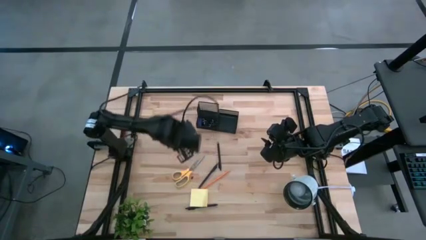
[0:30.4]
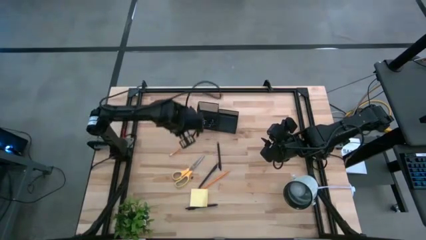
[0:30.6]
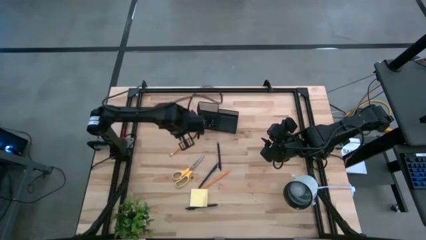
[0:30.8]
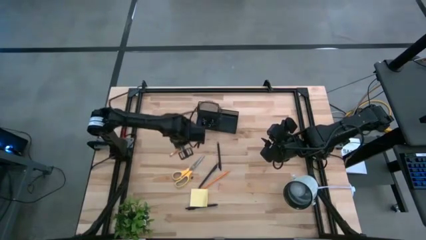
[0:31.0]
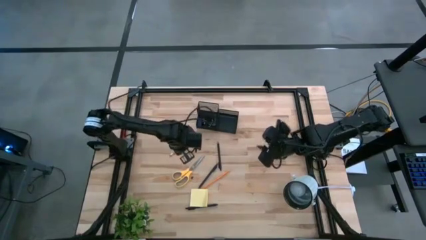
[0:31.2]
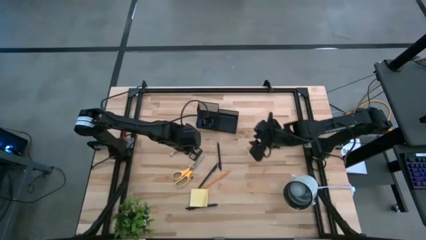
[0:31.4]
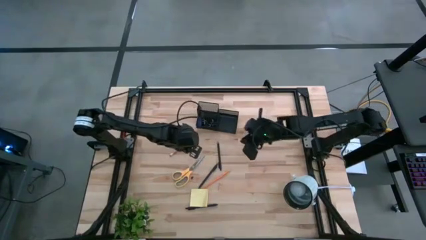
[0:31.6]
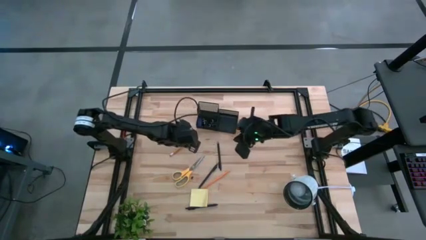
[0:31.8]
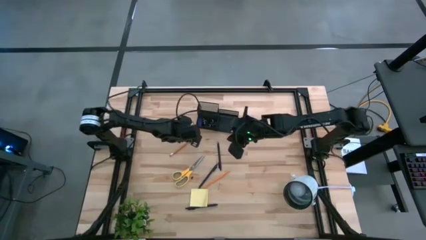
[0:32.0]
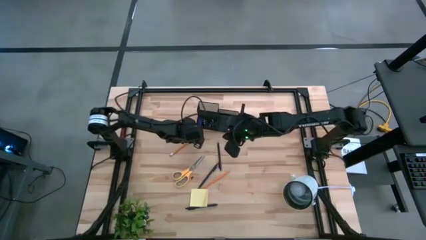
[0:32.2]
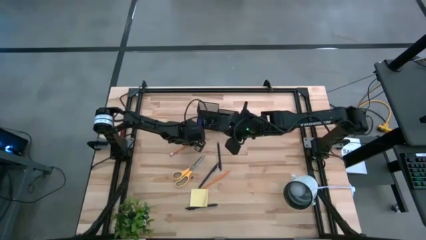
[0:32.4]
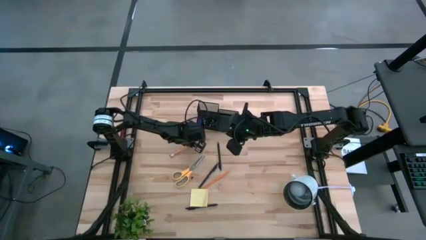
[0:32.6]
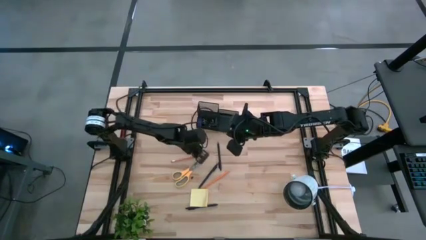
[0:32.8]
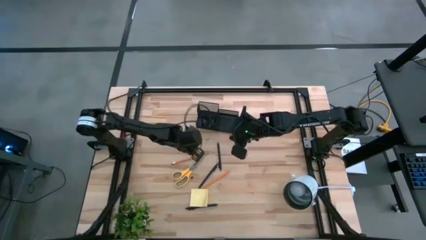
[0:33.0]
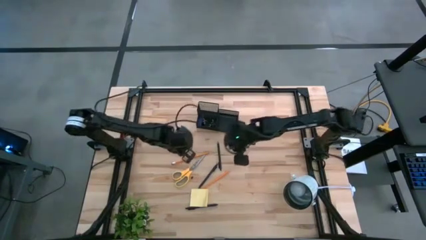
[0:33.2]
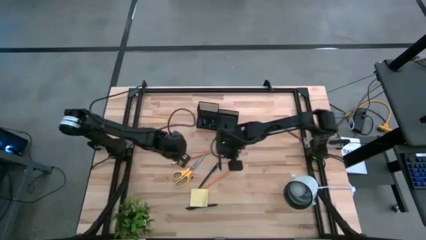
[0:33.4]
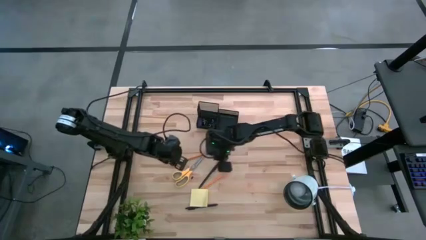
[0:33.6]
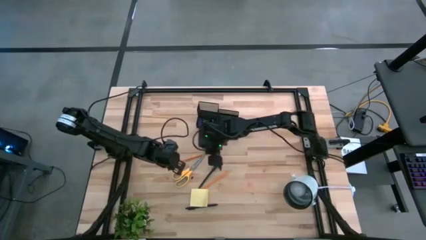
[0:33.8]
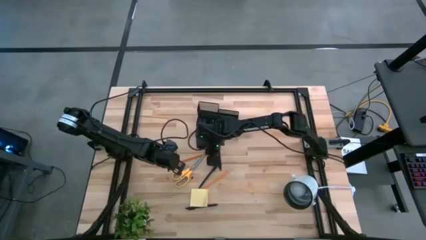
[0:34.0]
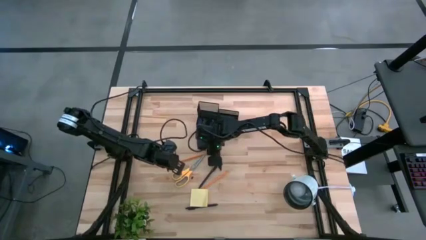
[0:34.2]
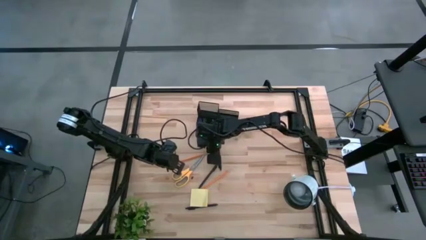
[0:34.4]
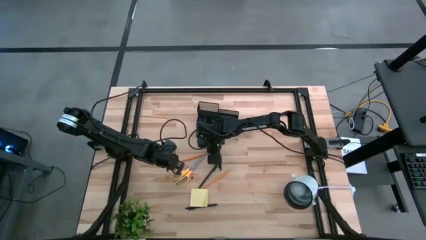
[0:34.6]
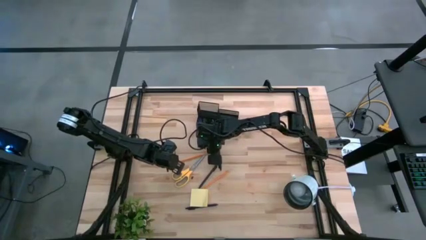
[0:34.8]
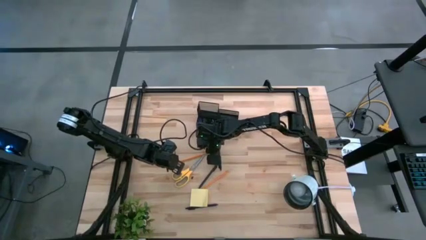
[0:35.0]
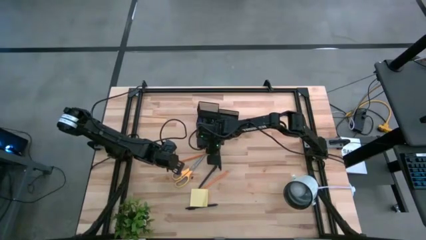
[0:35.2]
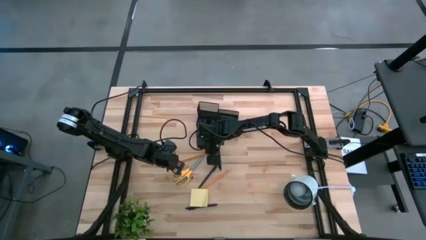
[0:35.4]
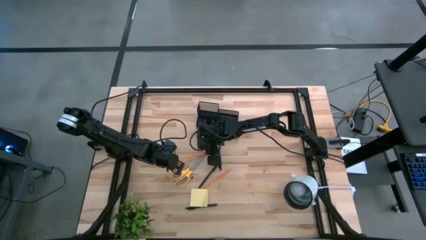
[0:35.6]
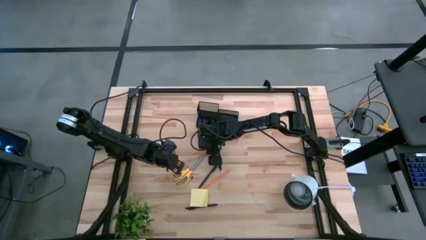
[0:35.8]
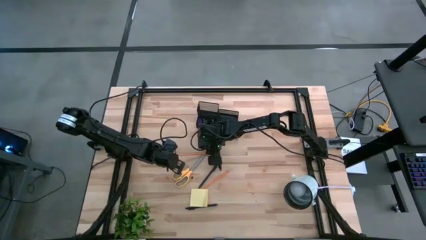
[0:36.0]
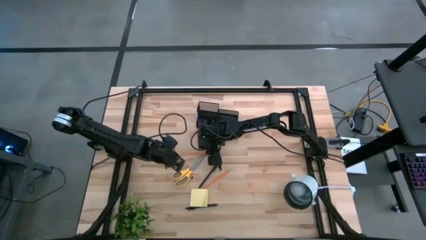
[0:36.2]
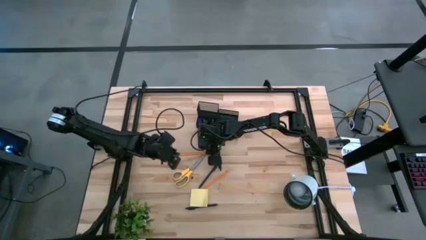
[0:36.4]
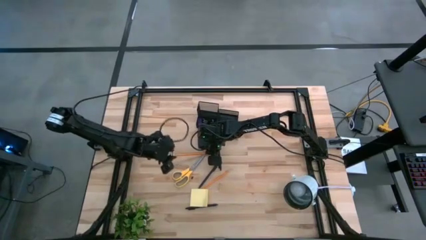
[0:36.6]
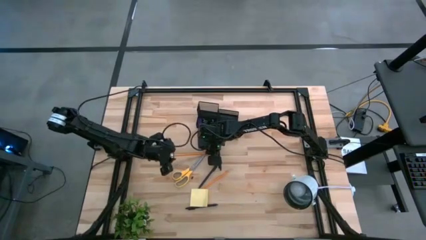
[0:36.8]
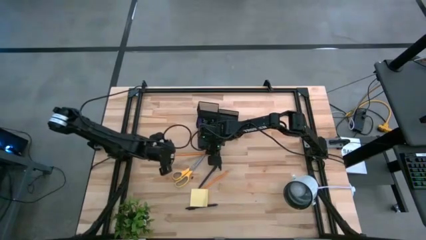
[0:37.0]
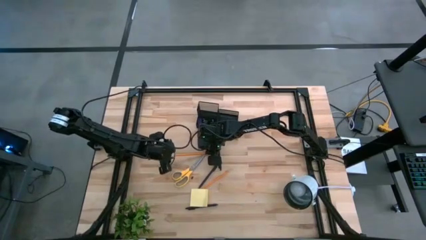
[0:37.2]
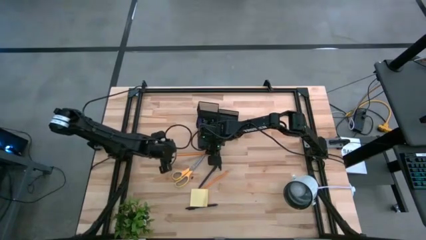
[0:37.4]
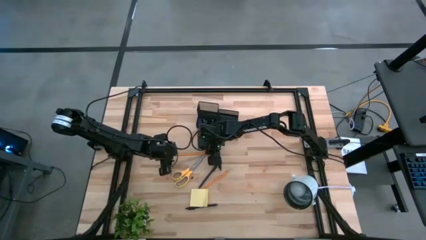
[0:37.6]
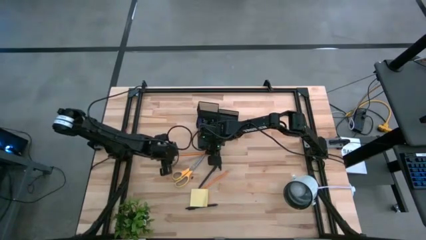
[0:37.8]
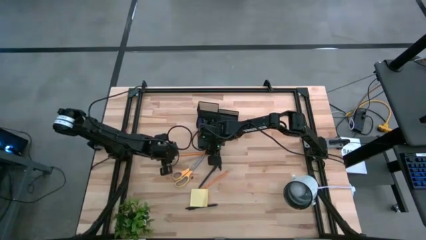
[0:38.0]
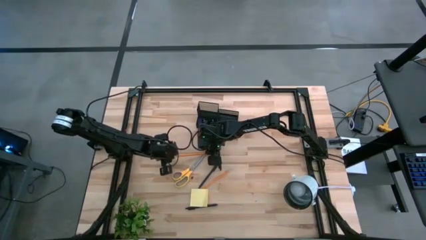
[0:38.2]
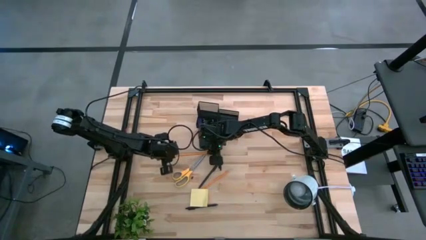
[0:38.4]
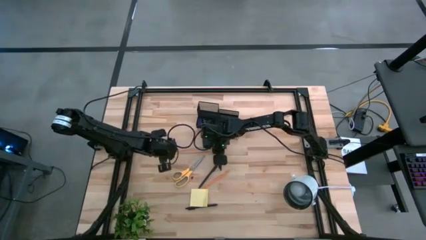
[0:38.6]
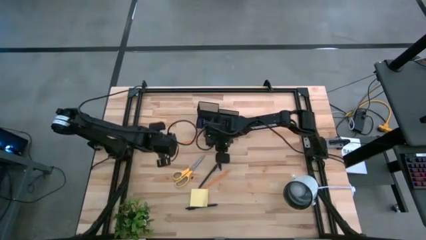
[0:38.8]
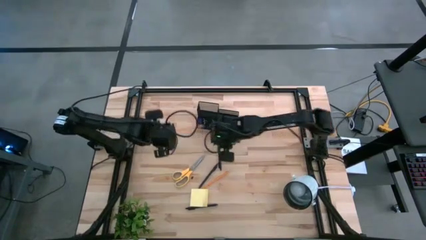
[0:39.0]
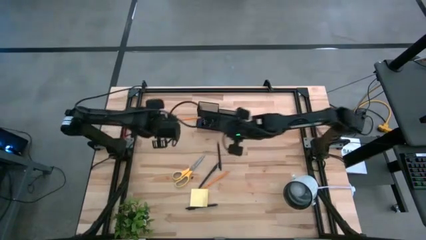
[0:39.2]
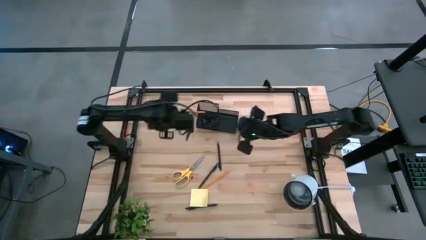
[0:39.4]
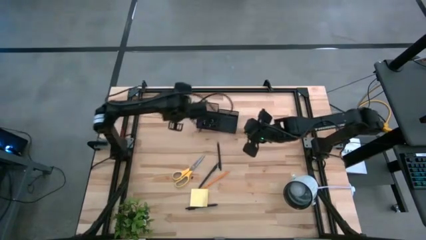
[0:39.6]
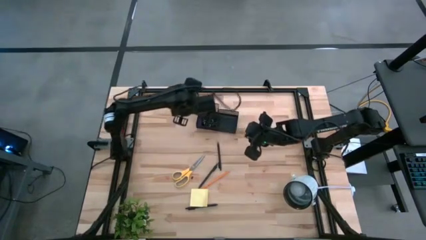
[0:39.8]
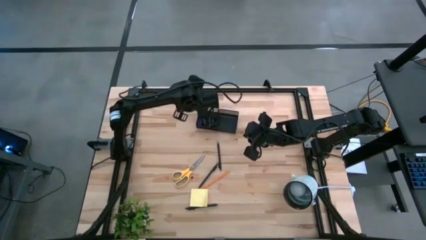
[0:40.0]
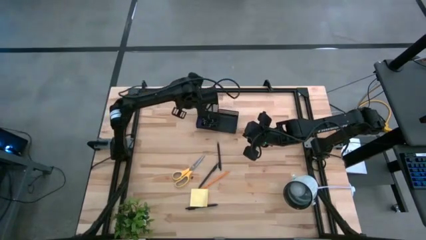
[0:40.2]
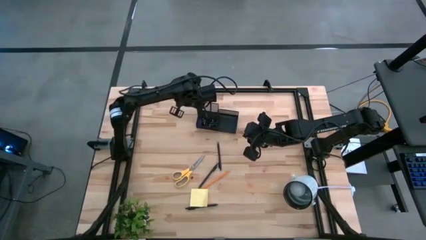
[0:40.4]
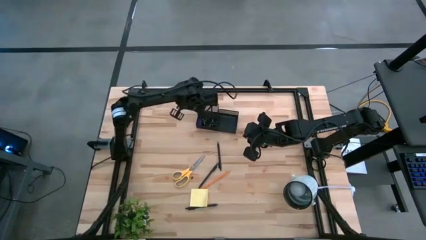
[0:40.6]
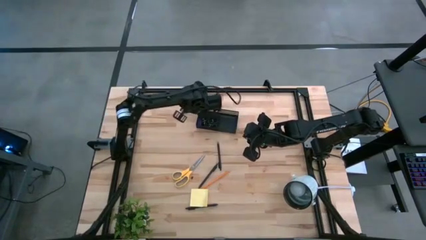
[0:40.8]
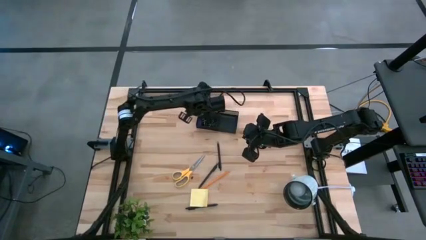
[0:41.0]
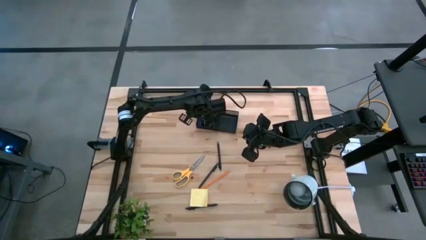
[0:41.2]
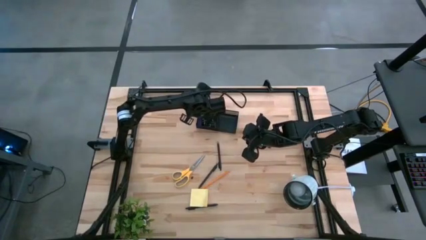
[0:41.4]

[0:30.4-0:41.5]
Task: Pick and place office supplies into organizer
Put the left orange pencil into the desk organizer

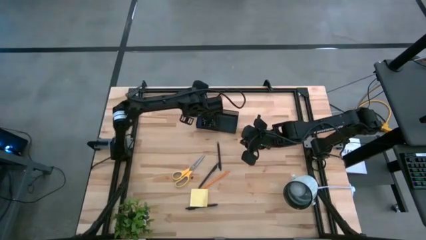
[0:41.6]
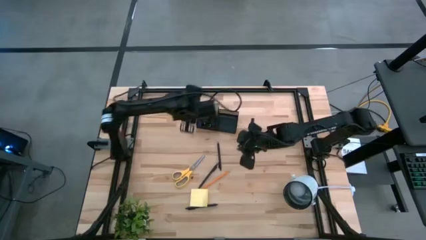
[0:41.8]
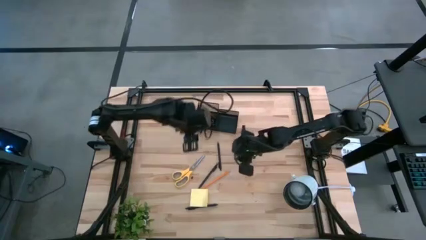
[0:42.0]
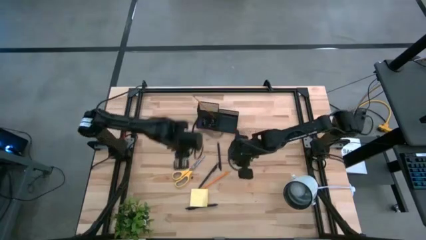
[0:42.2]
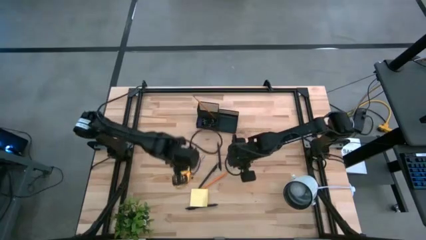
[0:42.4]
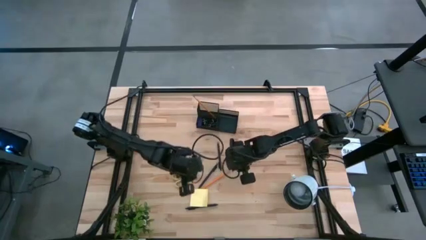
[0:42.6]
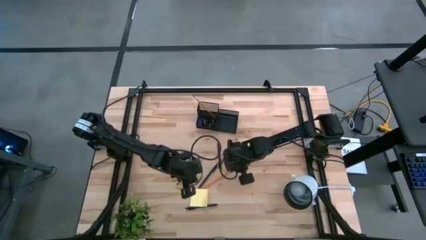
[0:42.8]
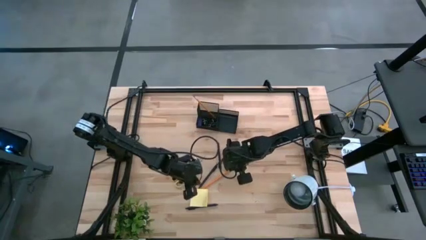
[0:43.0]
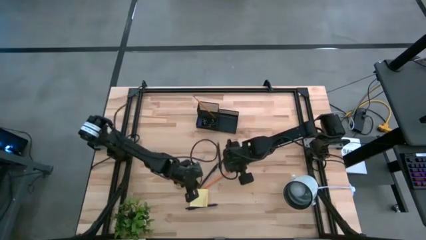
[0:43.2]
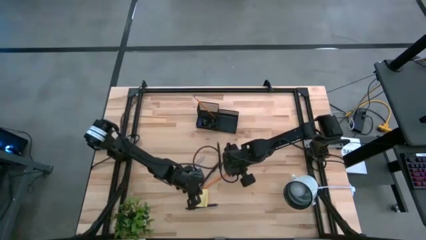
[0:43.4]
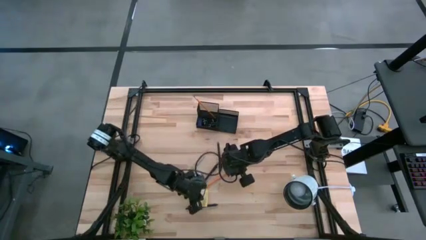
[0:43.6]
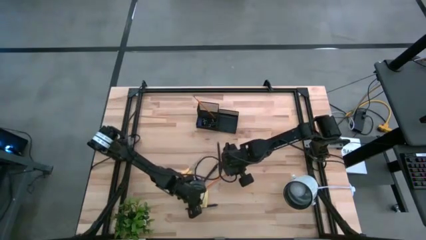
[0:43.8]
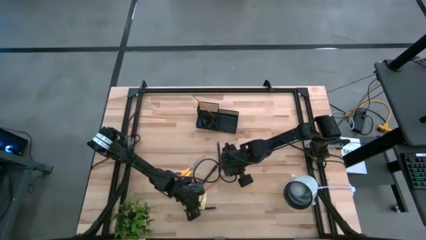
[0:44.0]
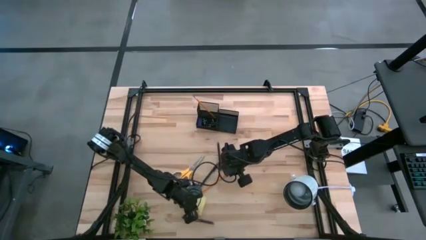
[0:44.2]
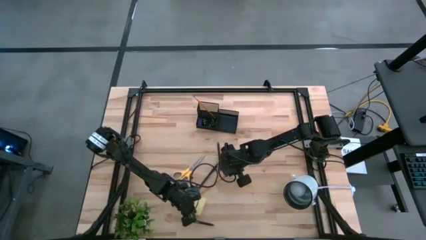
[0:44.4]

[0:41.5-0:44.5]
Adjust the yellow sticky note

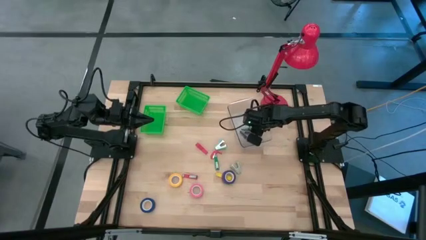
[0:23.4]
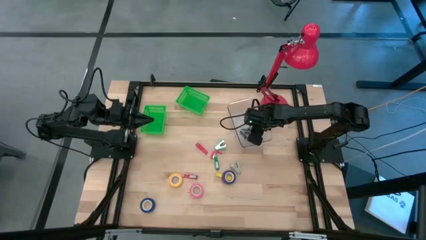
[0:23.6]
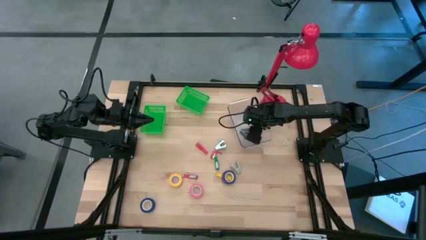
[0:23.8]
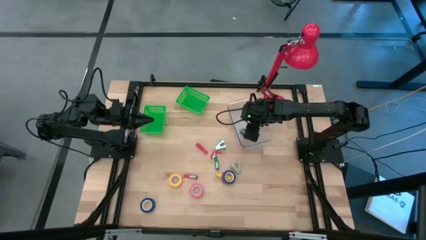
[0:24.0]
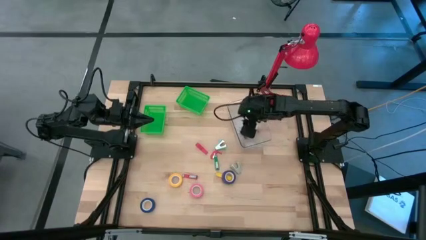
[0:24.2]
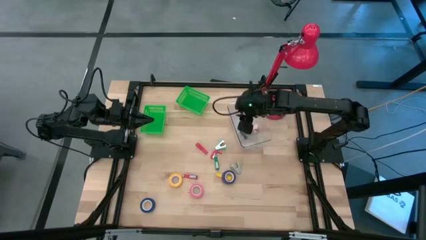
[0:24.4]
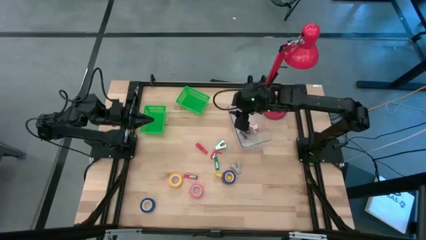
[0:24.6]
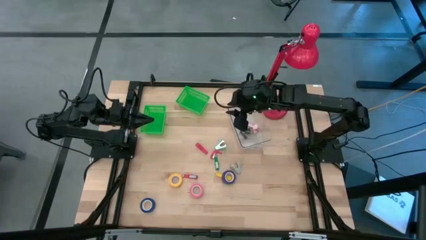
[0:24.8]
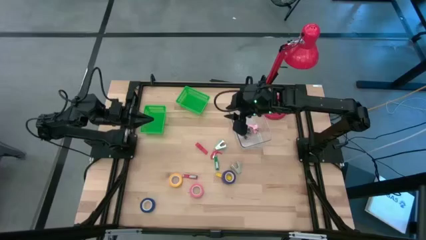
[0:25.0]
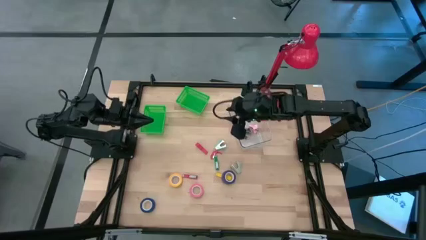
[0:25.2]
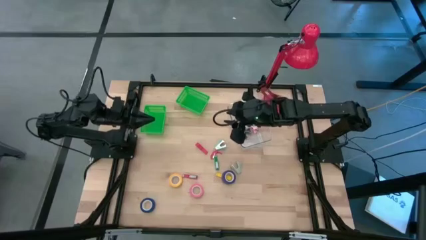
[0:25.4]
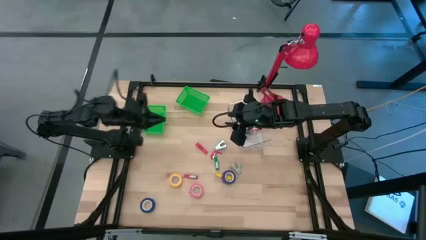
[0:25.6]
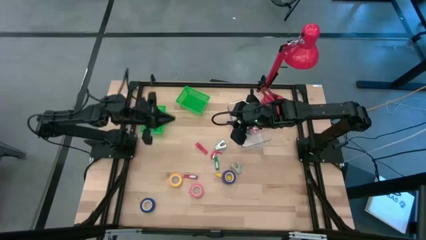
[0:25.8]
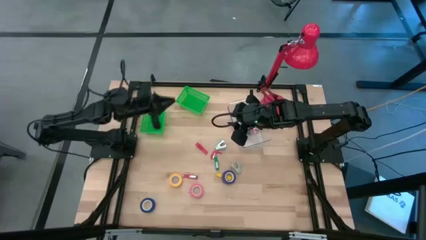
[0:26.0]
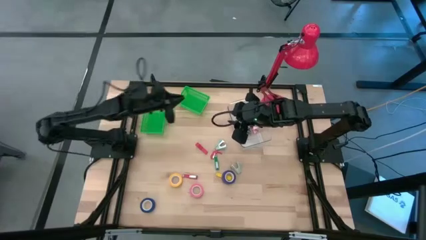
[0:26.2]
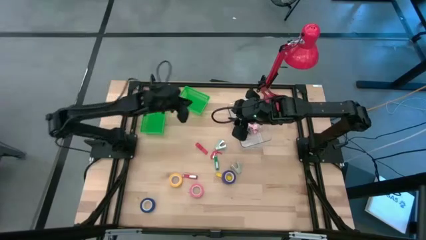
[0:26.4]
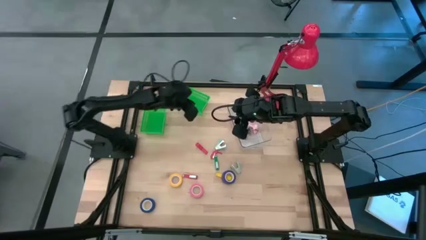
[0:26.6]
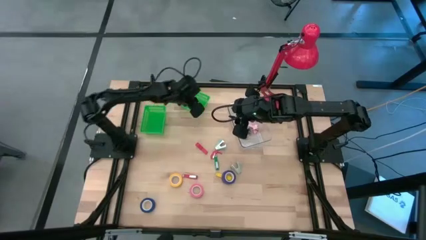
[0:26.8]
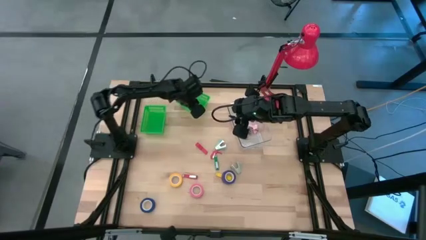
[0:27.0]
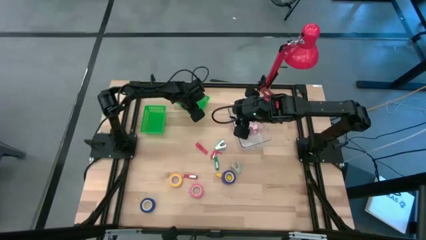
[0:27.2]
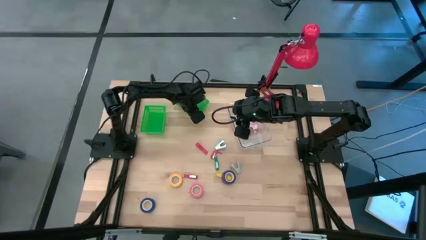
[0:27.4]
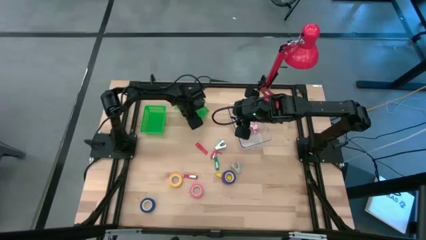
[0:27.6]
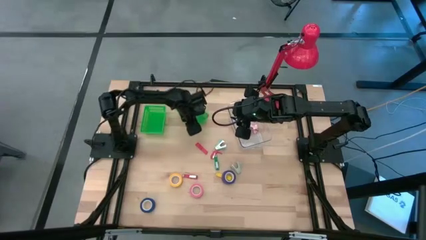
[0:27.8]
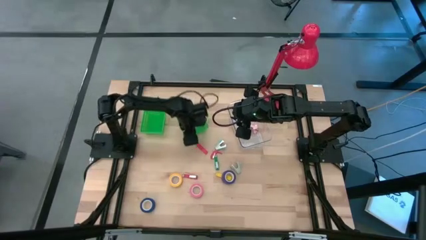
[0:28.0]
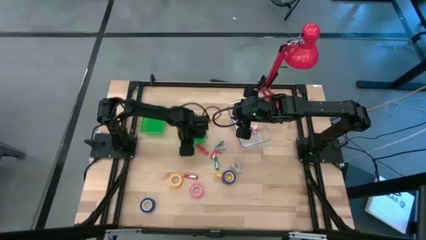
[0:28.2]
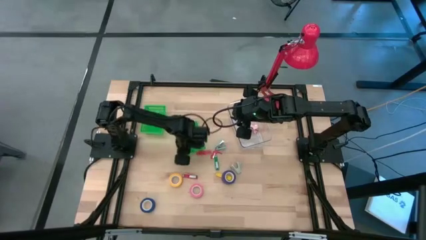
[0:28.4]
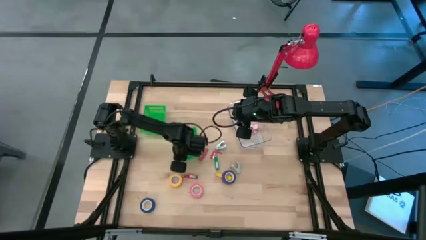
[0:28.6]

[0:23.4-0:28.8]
Task: Pick and place Stapler, Stapler remover, tape
Move the right green bin to the center
